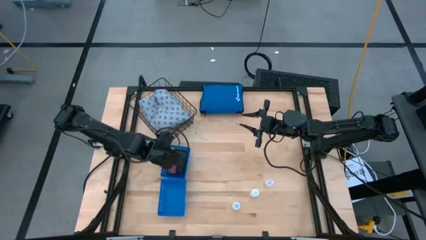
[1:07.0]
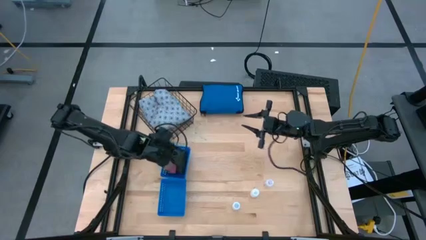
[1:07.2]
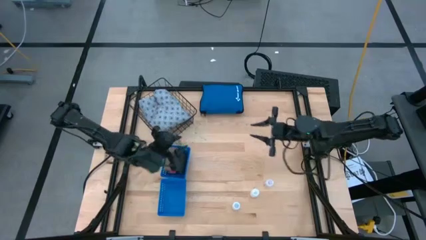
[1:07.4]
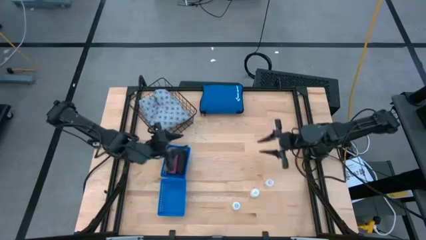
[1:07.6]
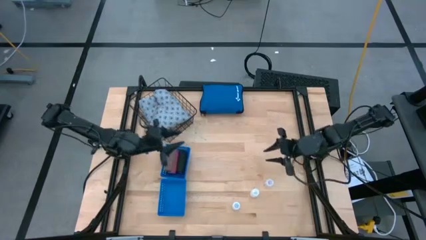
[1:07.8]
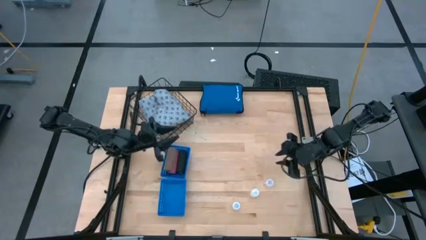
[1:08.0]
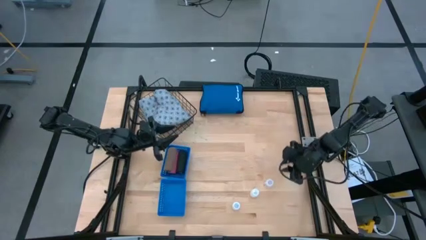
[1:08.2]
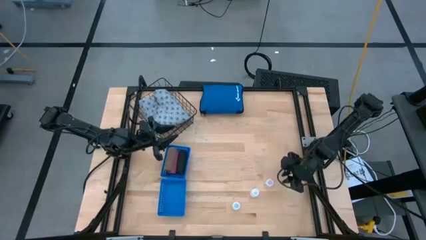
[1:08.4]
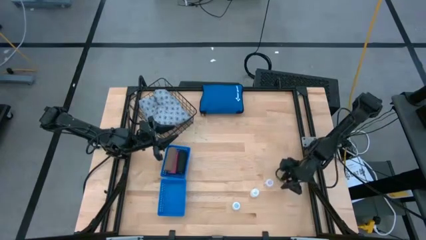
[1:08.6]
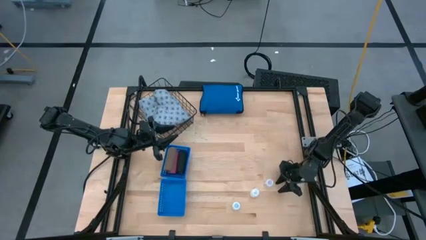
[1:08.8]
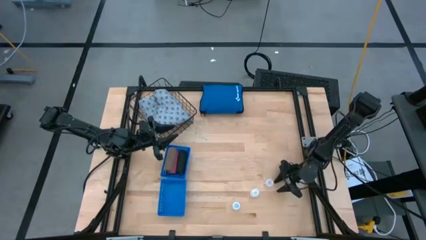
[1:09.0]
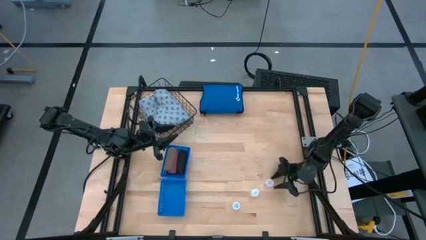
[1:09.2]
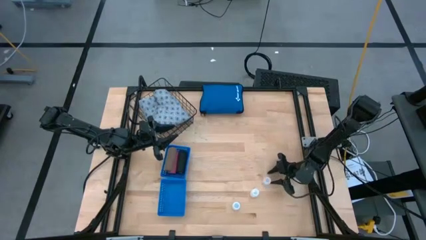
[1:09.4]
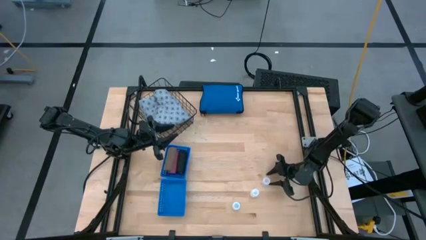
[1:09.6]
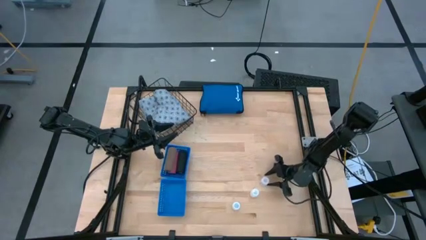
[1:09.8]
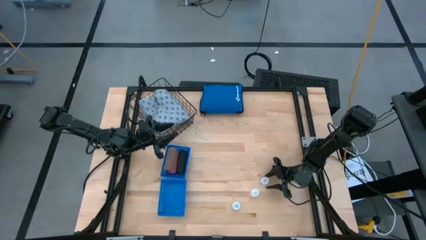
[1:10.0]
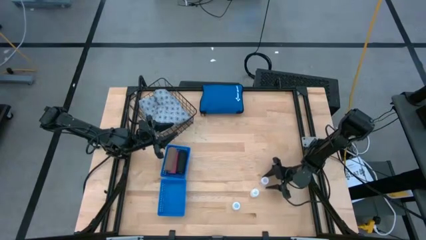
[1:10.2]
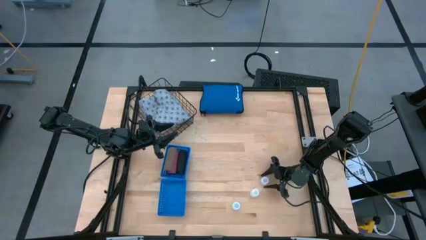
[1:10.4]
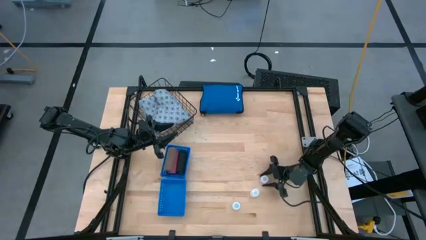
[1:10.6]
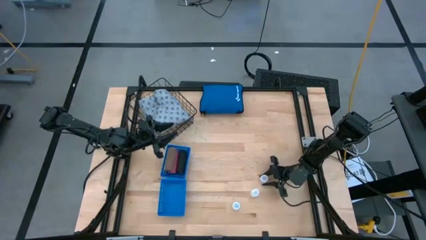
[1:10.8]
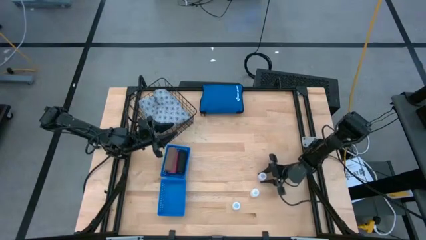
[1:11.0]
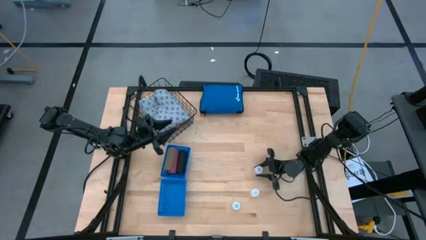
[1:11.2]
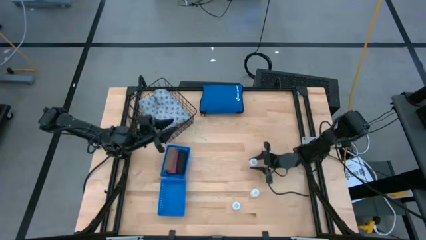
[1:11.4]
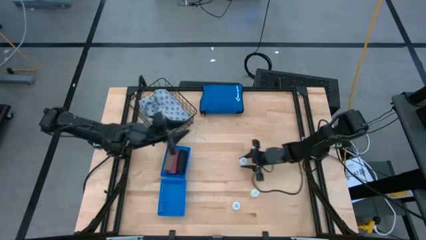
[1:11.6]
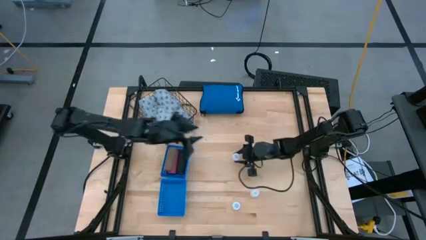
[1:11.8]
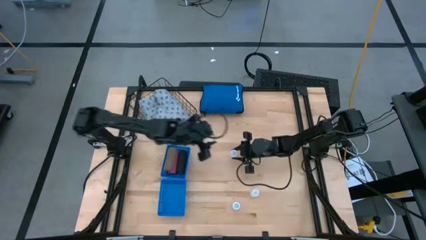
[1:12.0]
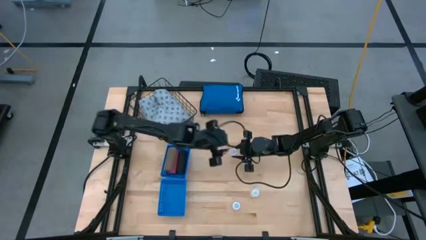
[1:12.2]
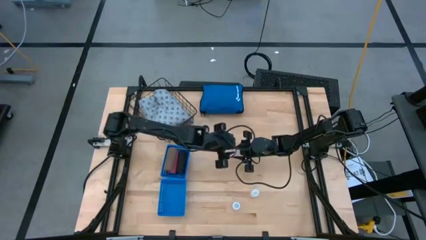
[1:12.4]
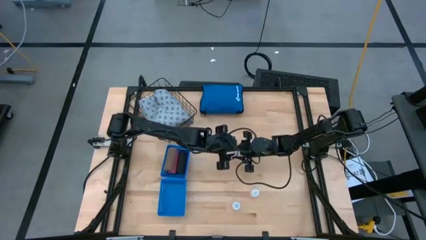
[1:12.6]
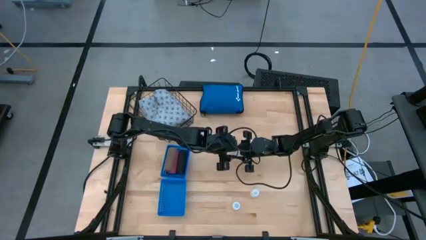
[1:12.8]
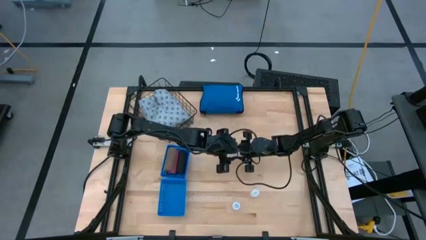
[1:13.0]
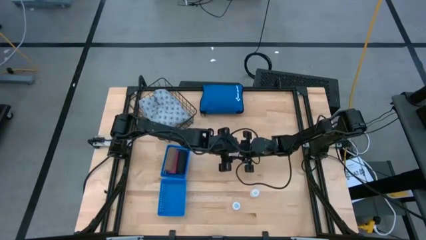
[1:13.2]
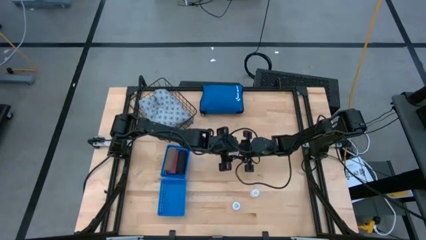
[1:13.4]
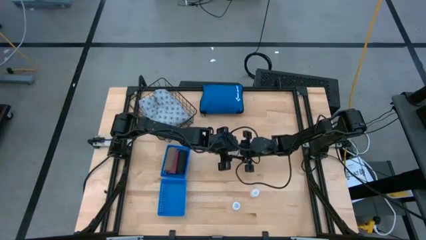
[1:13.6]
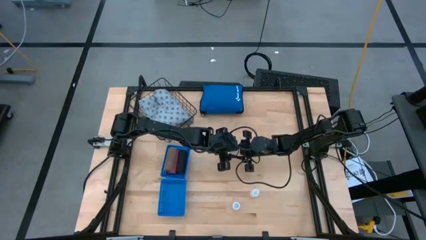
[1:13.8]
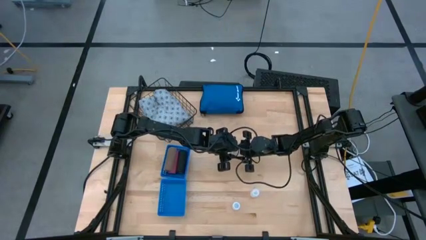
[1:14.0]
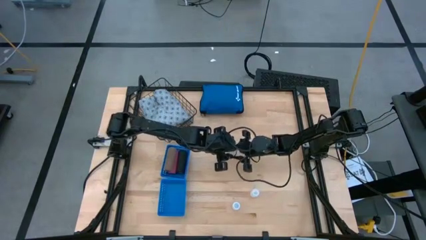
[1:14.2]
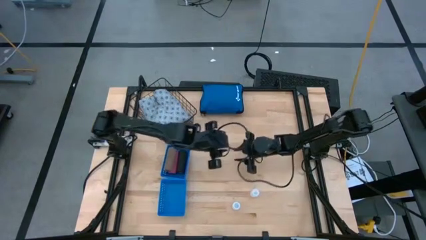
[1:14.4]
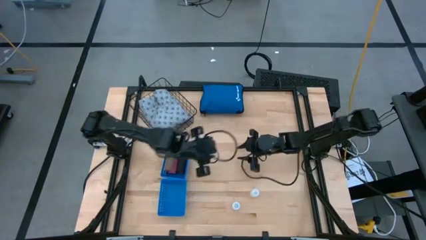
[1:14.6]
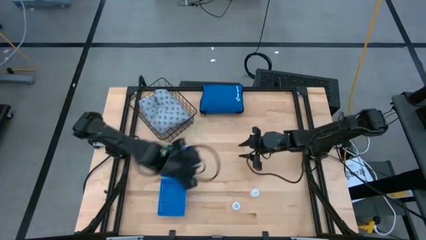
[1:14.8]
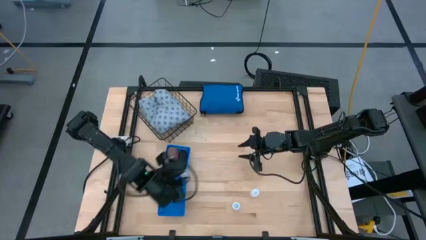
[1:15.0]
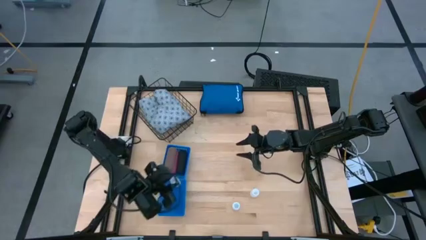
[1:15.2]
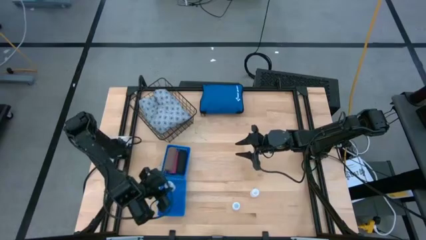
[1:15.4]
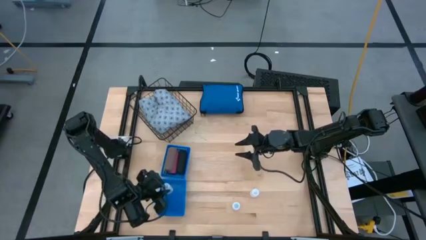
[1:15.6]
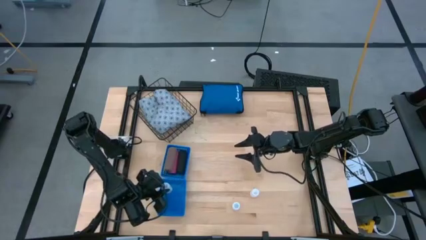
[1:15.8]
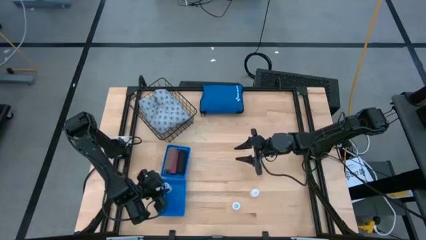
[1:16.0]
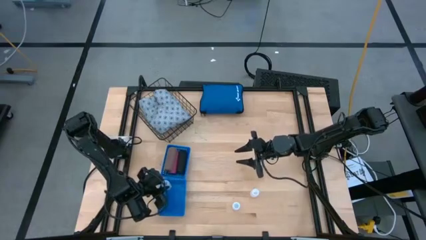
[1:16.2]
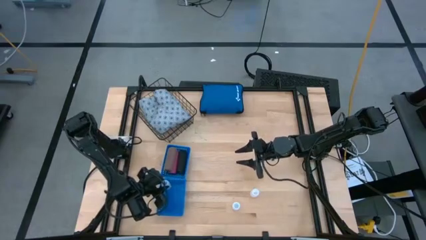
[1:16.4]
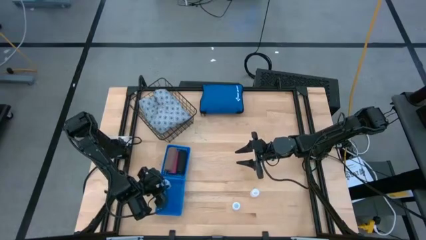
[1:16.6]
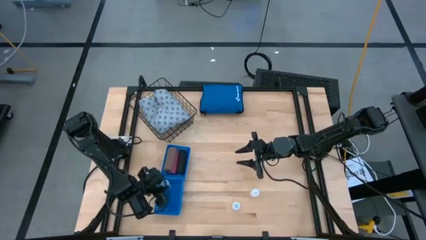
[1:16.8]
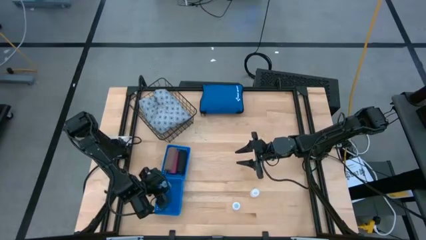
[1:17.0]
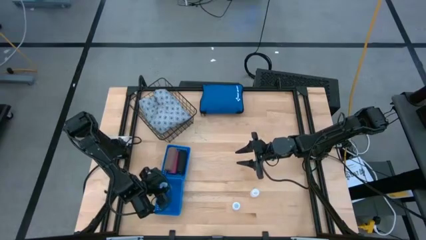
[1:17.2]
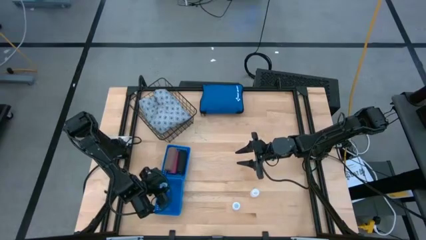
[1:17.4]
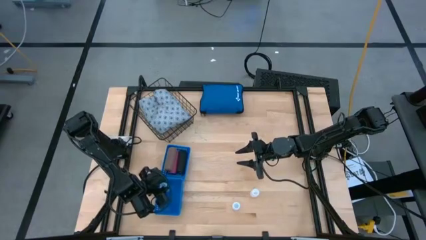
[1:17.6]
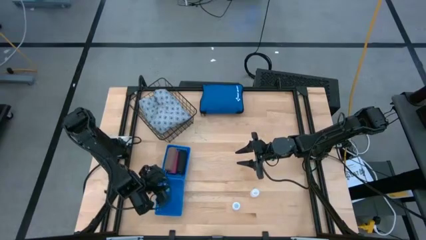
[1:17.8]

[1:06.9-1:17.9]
Task: Pick & place medical supplies in basket/bin
Put the right white pill bottle into the bottom blue bin
